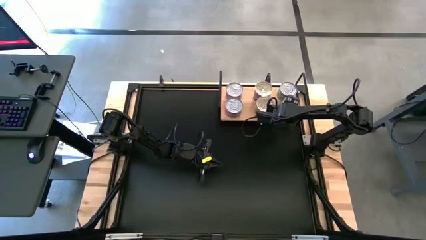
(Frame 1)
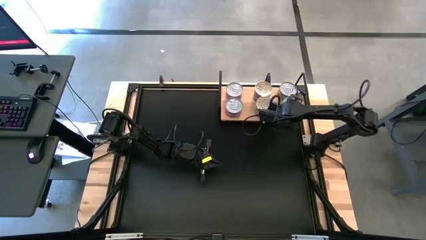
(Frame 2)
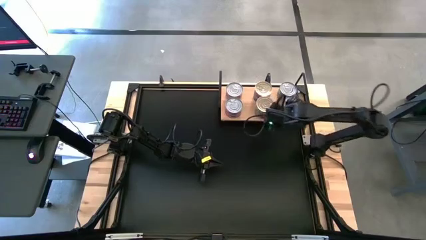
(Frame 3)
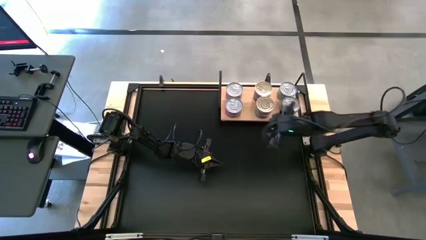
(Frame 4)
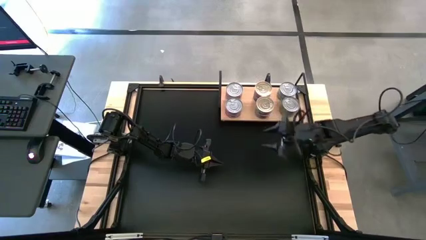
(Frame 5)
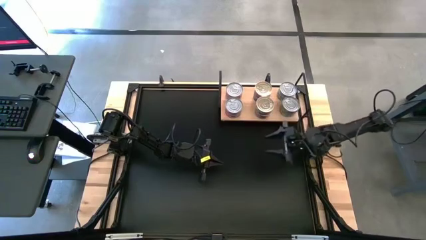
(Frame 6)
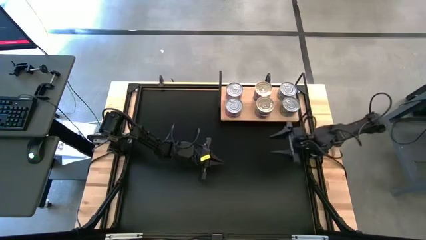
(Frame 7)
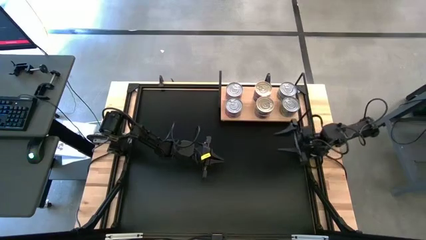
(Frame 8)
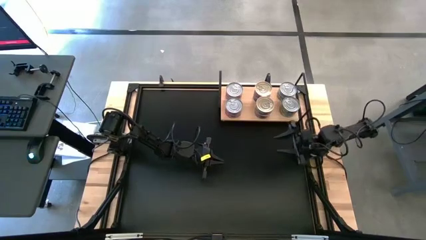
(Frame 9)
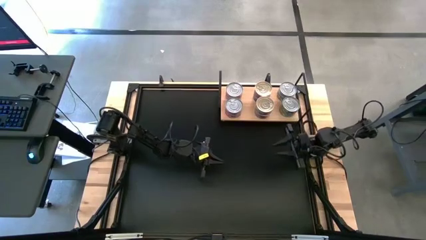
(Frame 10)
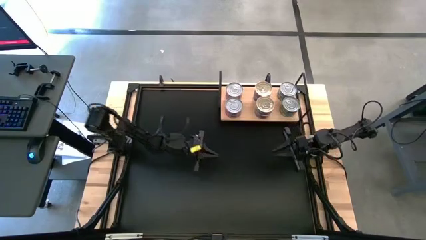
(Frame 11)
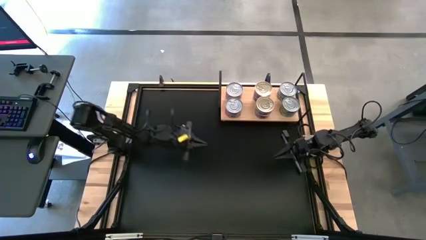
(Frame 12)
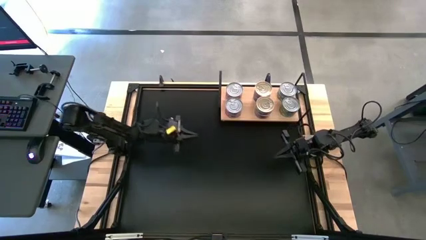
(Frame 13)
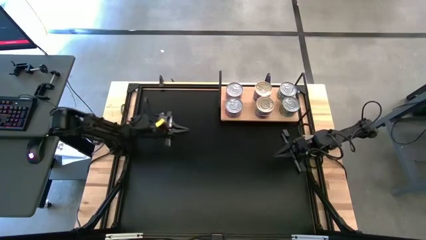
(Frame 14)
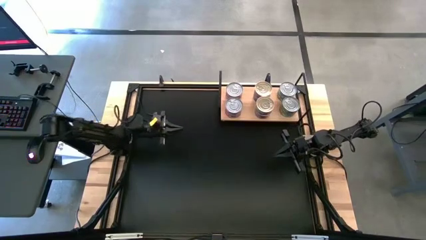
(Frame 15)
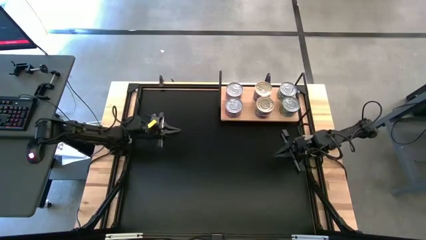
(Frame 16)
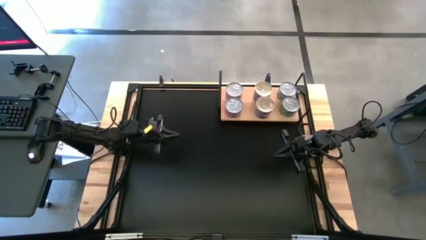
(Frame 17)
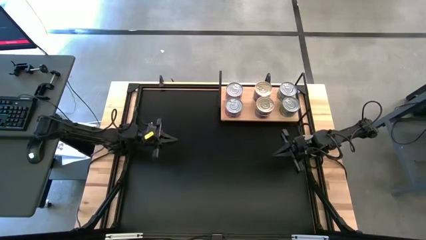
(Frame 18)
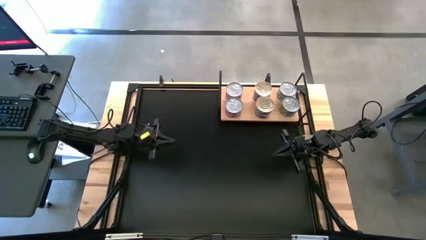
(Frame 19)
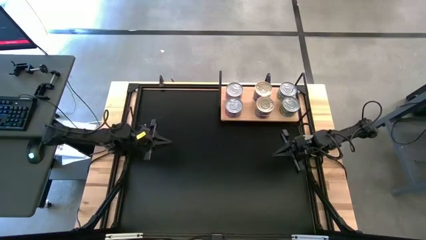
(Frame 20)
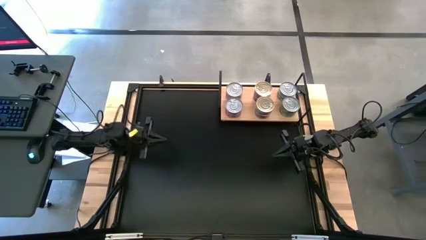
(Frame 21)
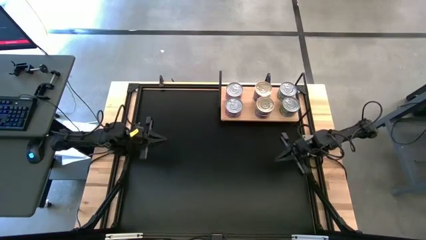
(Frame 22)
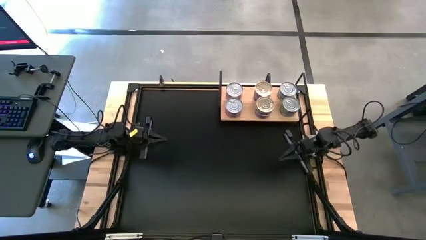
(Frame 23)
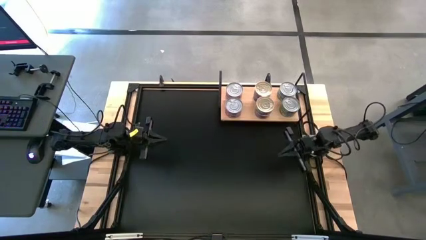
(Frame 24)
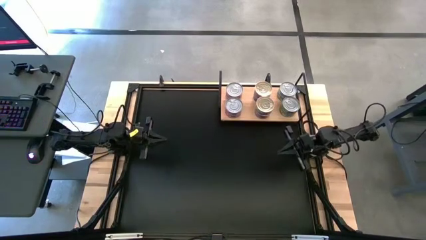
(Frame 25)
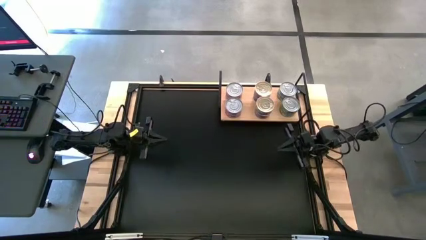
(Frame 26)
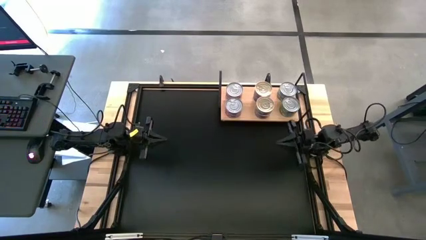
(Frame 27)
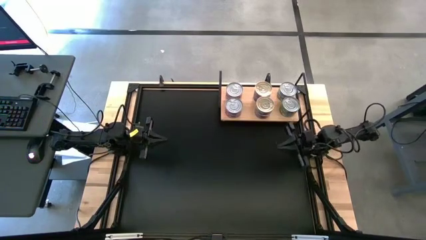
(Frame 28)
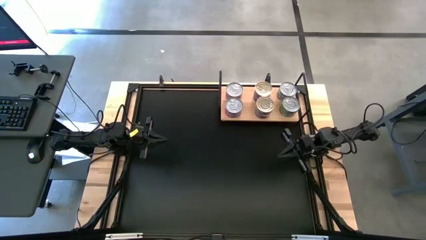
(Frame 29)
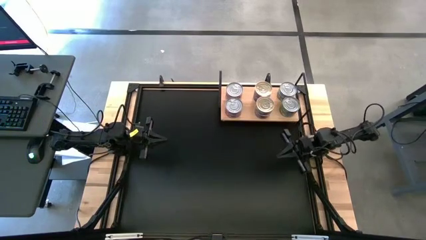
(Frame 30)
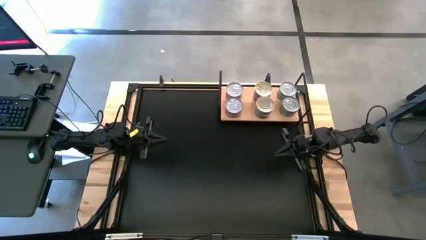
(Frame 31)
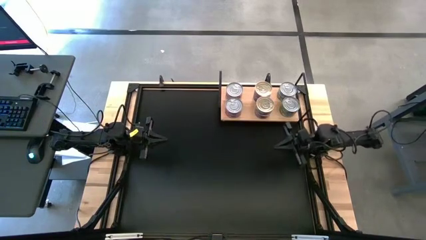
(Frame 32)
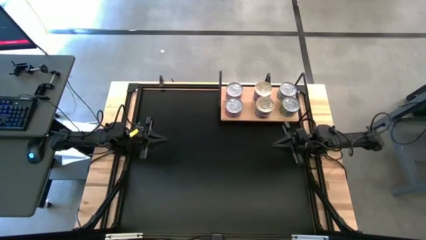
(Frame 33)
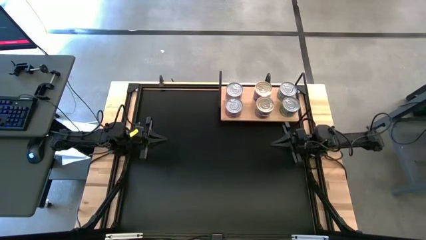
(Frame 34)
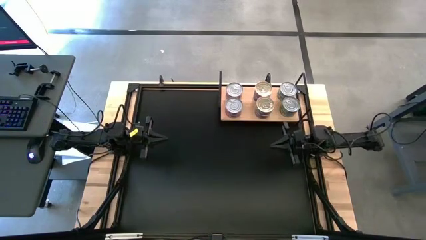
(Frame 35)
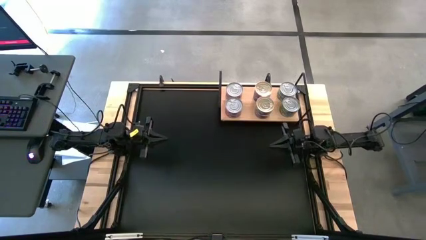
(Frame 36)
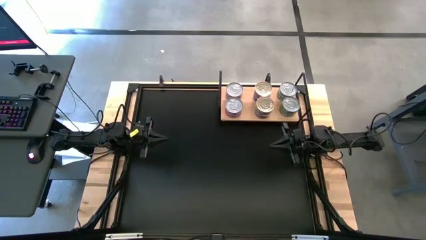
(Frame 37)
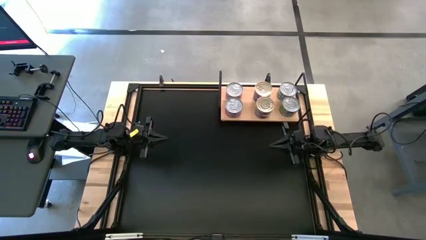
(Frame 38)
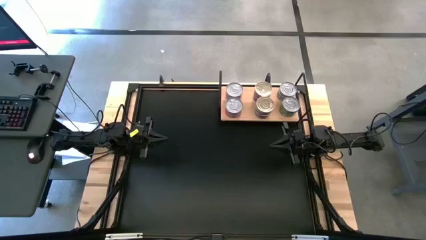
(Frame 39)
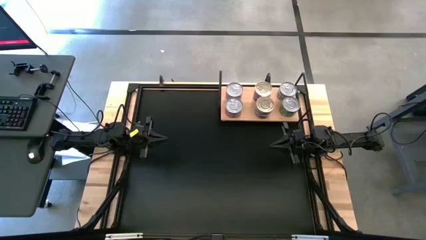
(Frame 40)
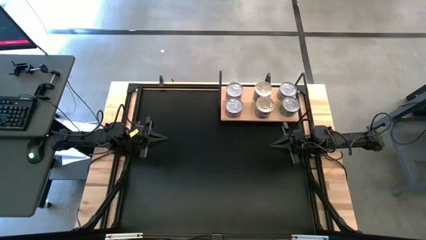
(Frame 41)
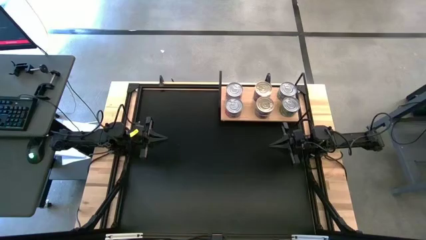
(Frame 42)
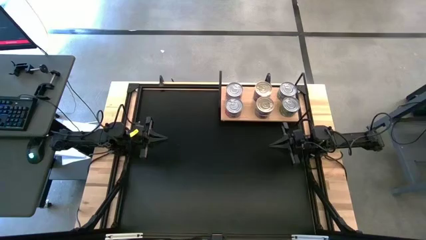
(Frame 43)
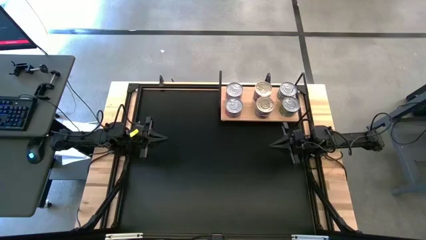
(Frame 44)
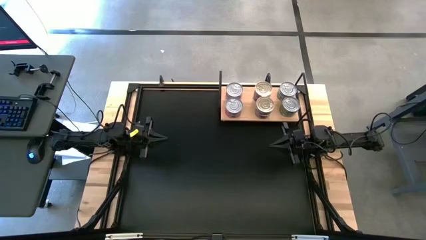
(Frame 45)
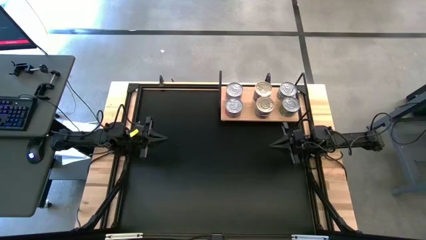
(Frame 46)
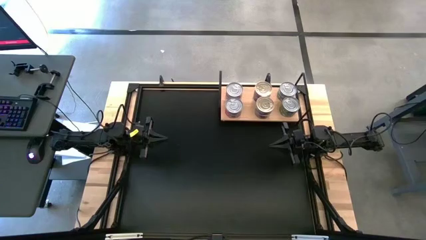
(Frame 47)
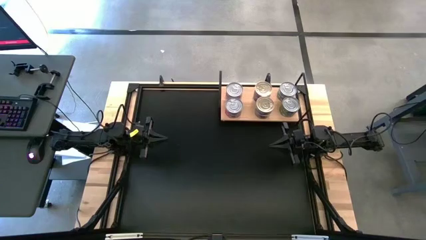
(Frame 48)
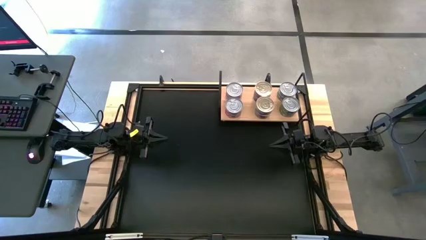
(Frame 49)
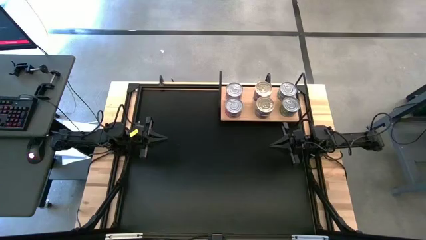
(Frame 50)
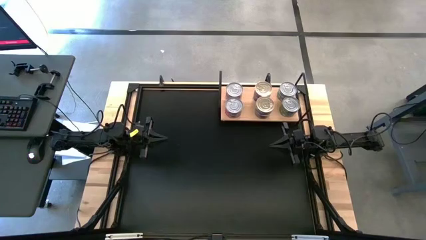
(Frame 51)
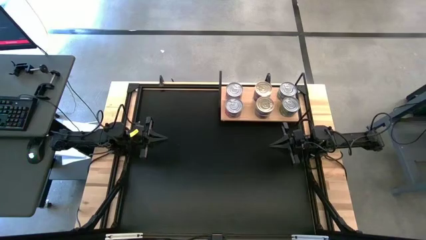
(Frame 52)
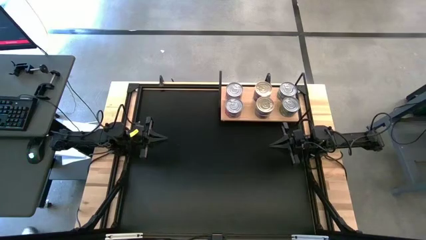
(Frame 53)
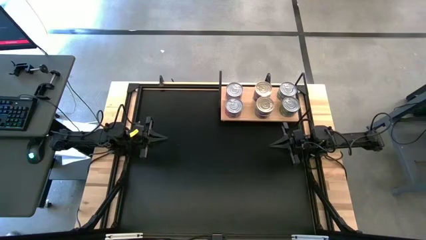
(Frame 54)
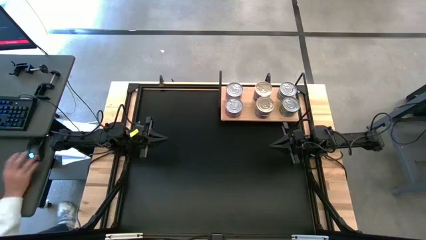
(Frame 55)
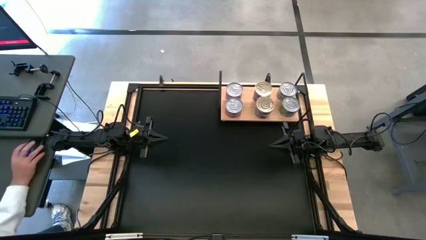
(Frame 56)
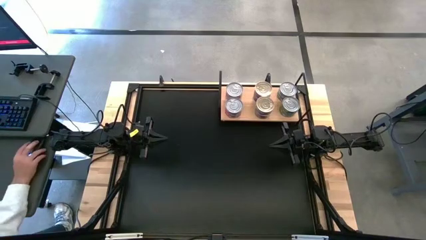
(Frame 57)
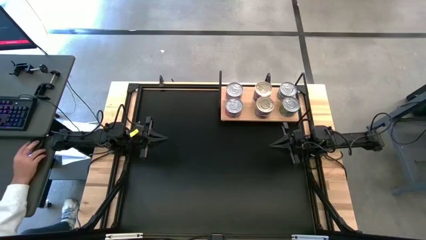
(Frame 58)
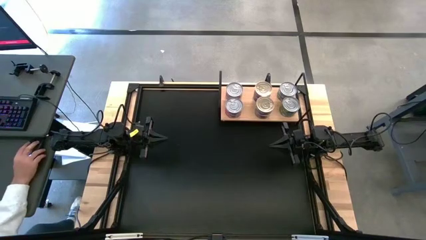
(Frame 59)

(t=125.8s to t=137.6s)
Task: Stack canned seafood by type on shelf
Return to Home Position
